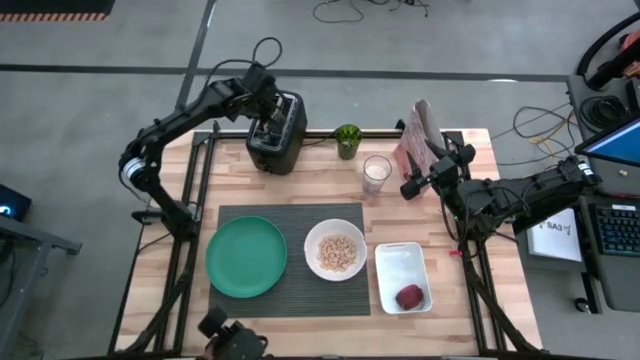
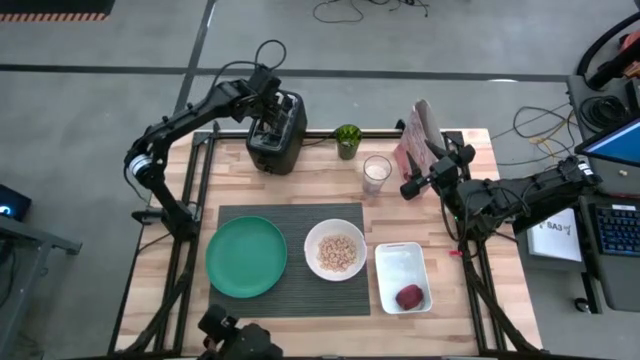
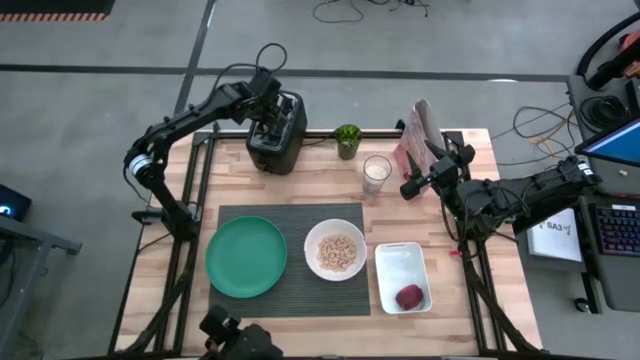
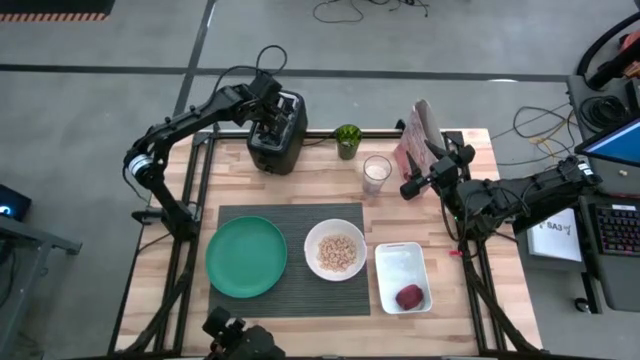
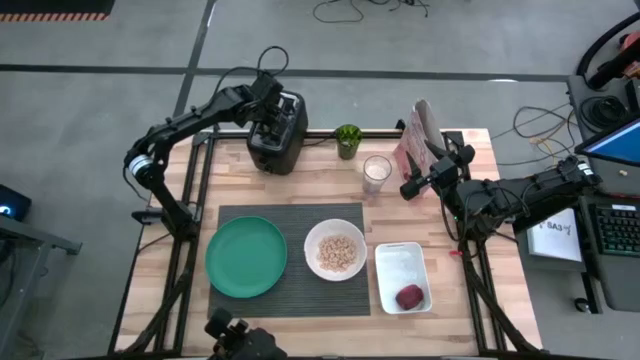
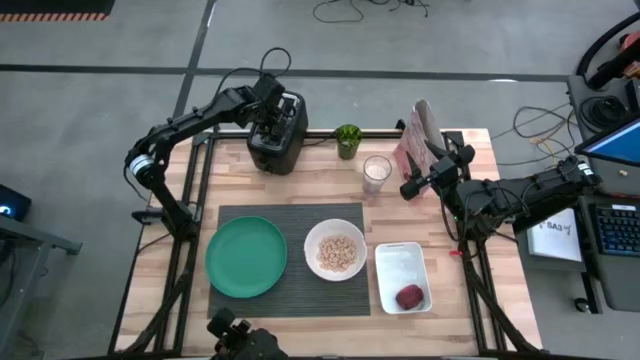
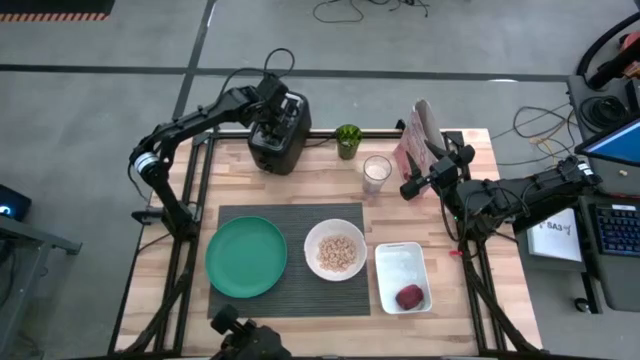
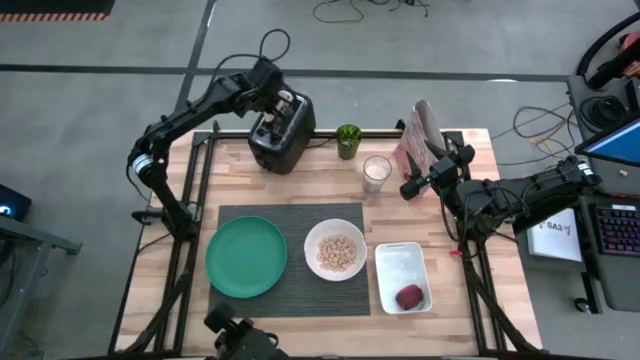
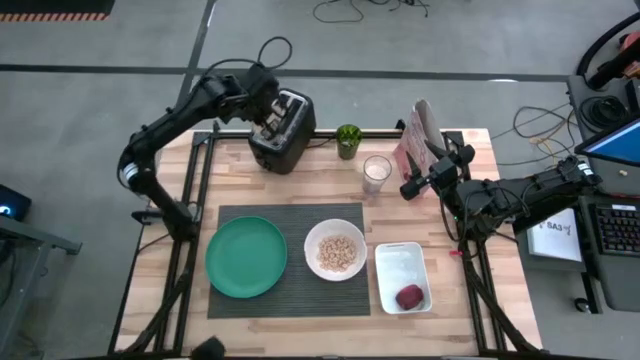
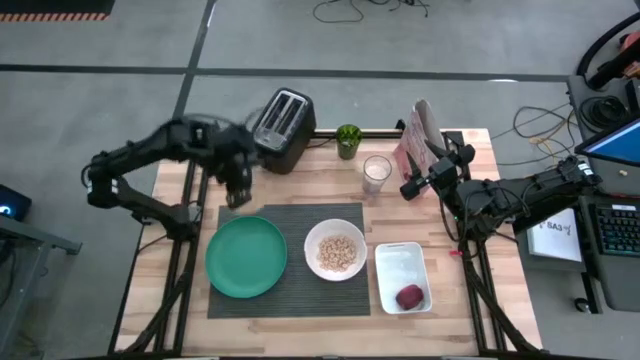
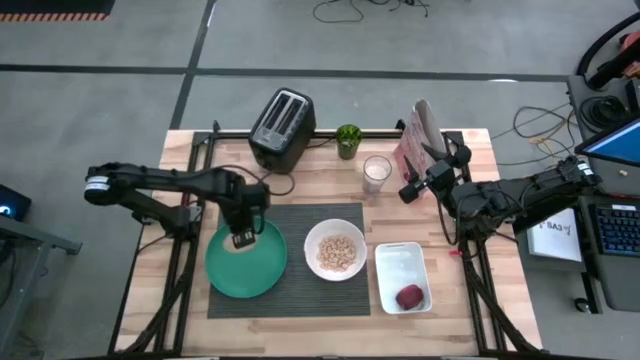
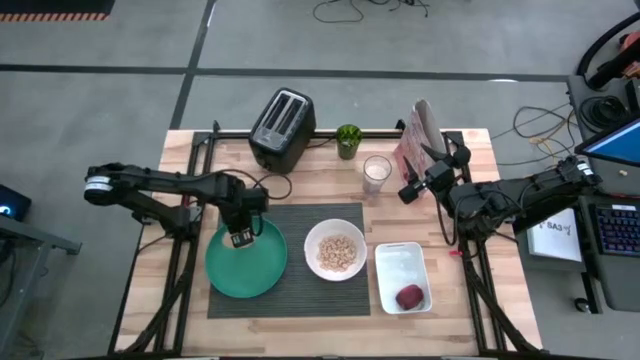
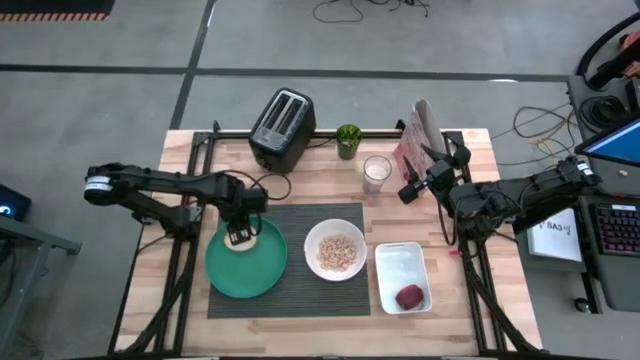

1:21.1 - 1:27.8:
Task: Arrange a breakfast setting
Put the bagel on the green plate

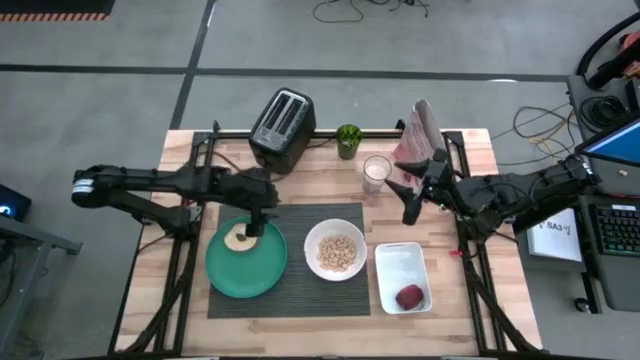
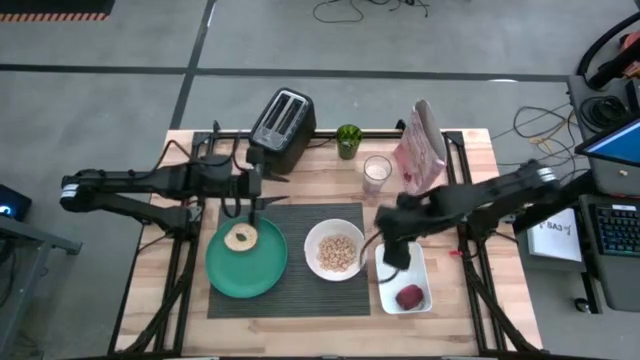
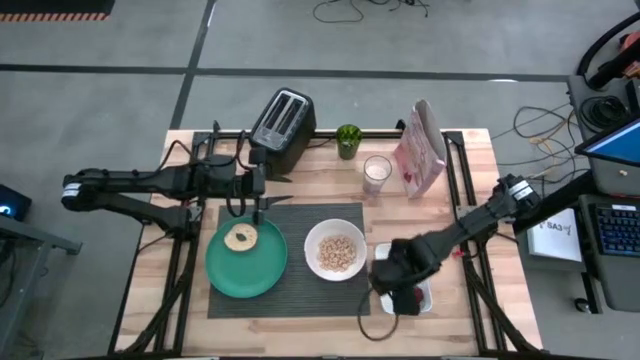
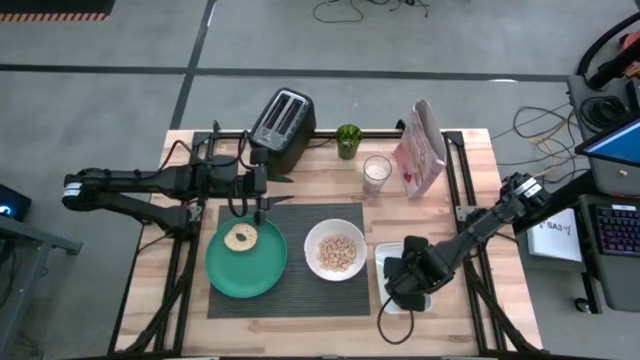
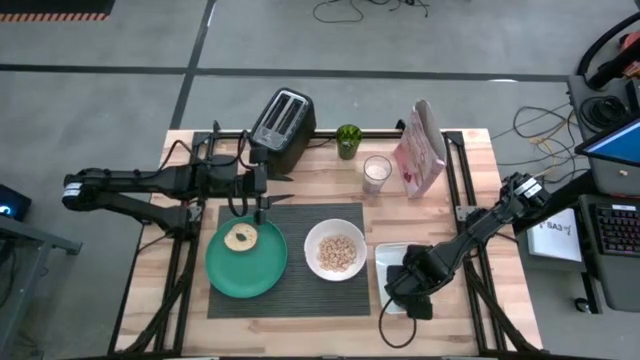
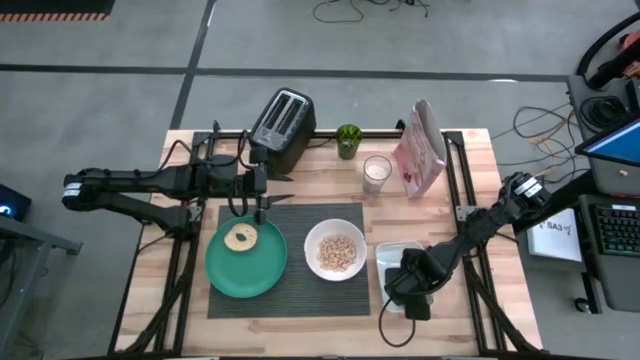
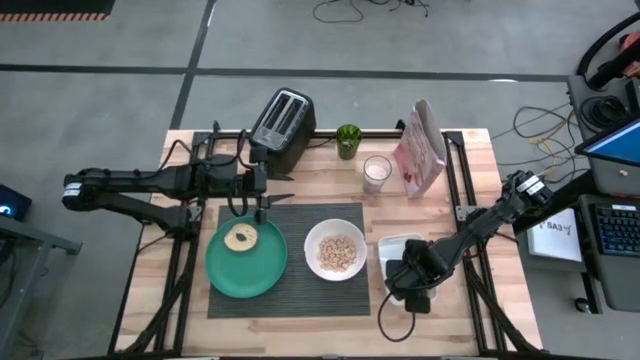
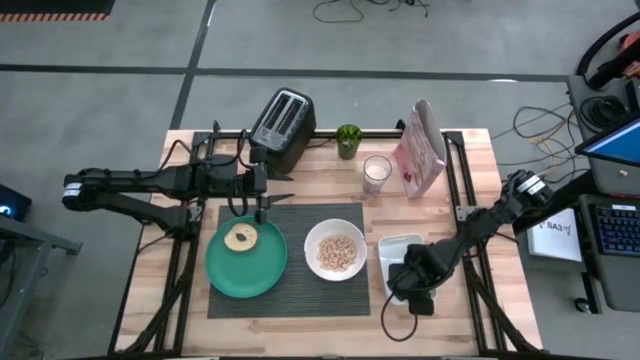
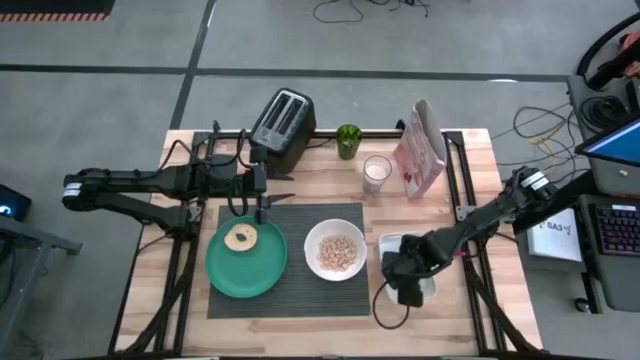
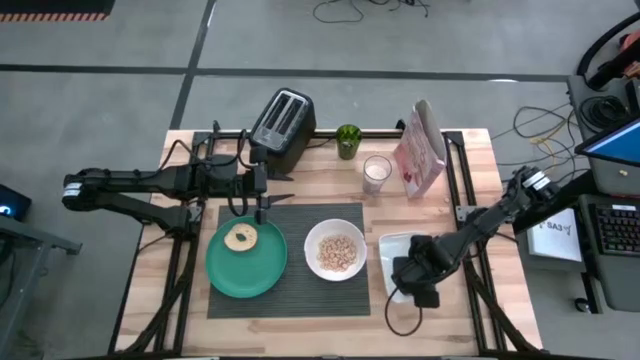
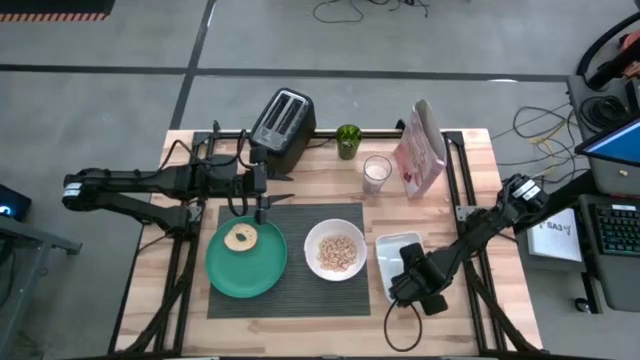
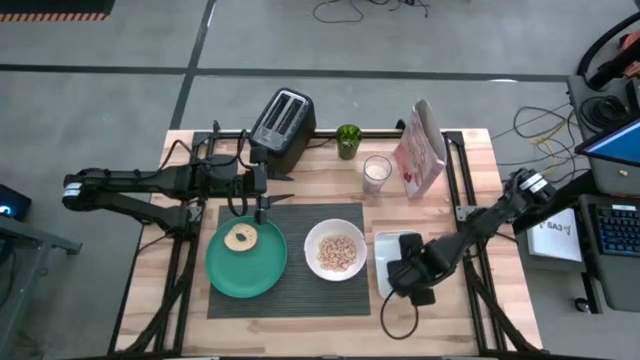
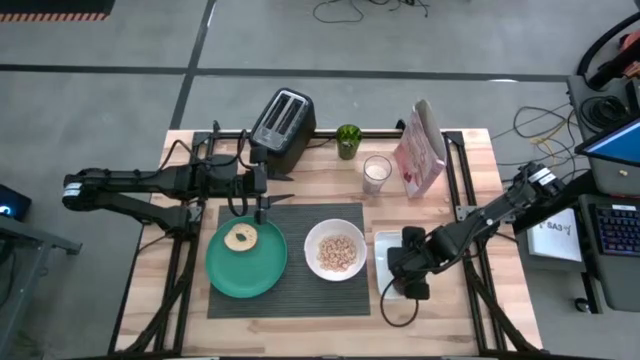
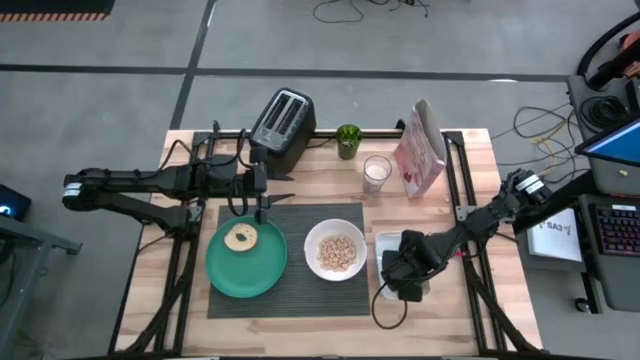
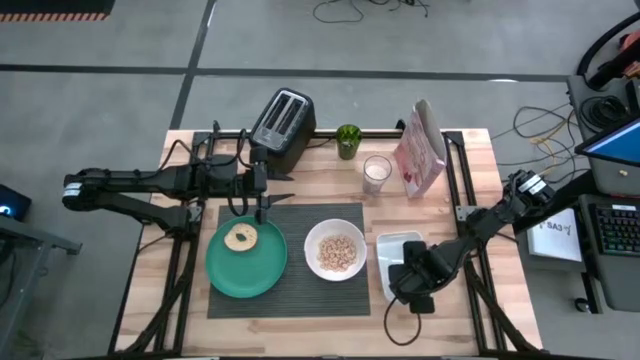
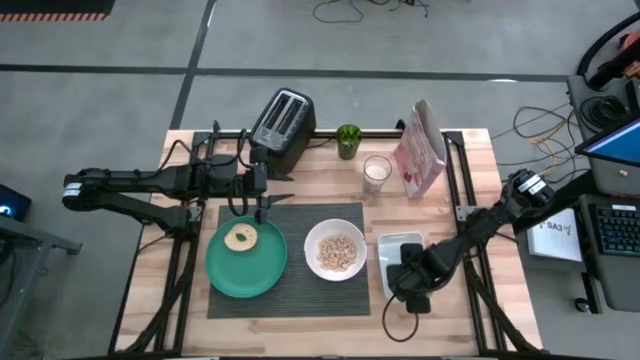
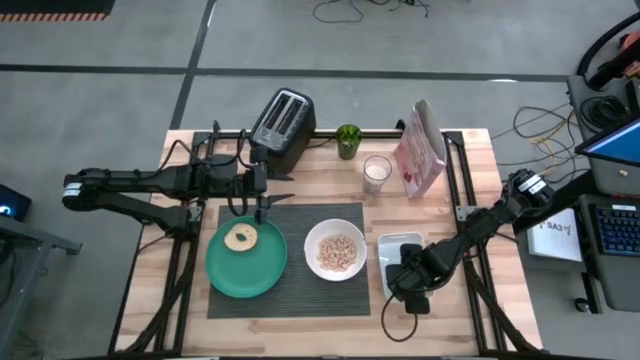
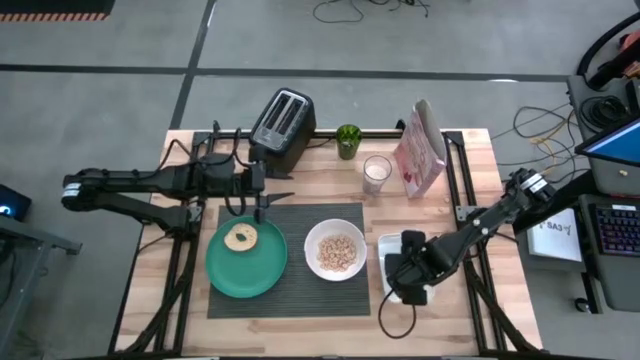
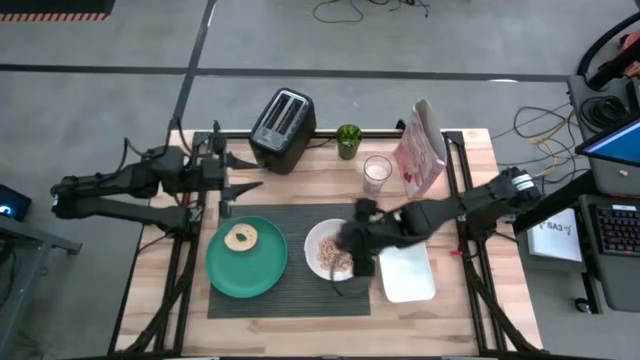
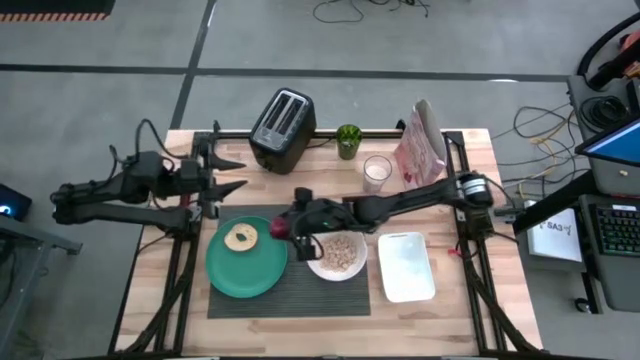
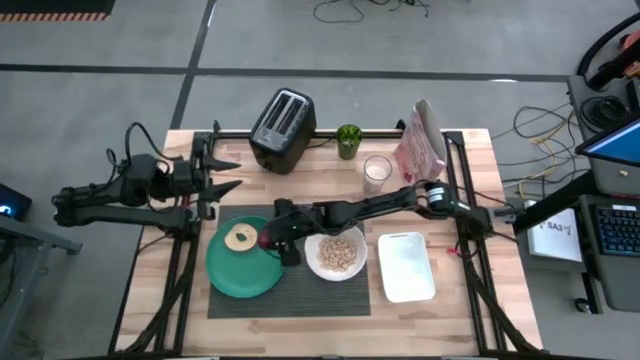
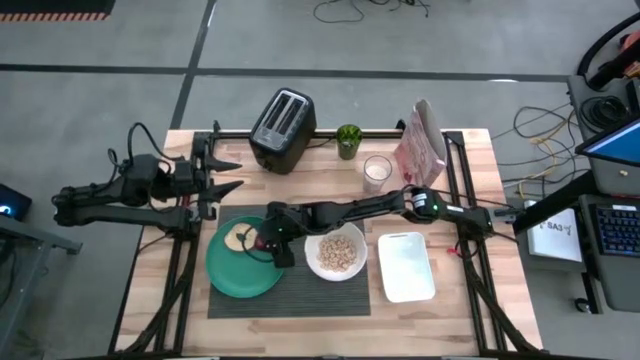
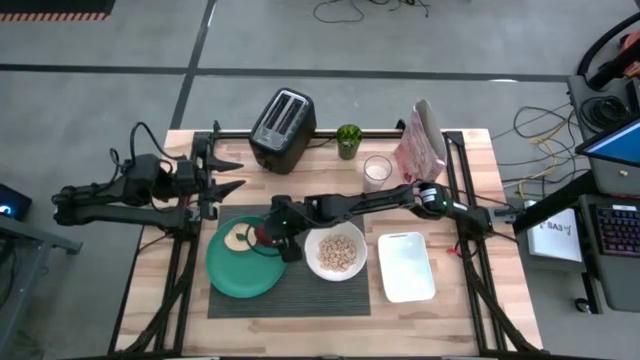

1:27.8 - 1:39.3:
Put the apple on the green plate

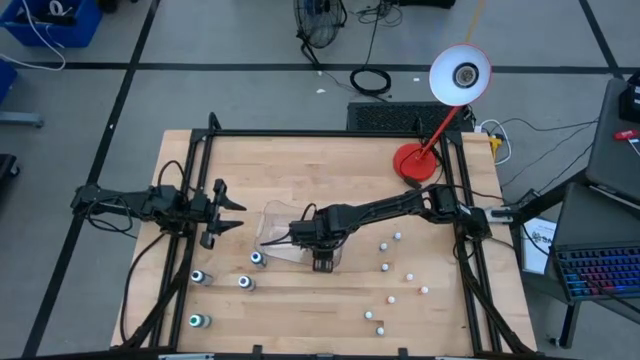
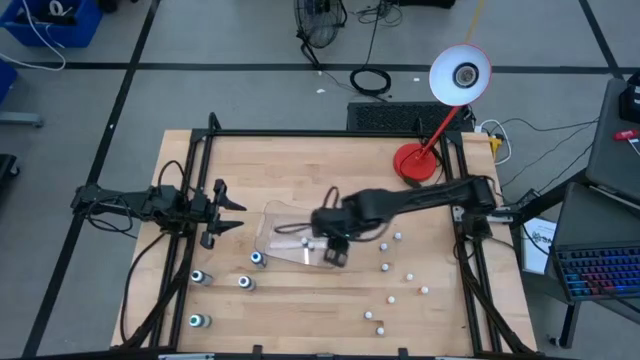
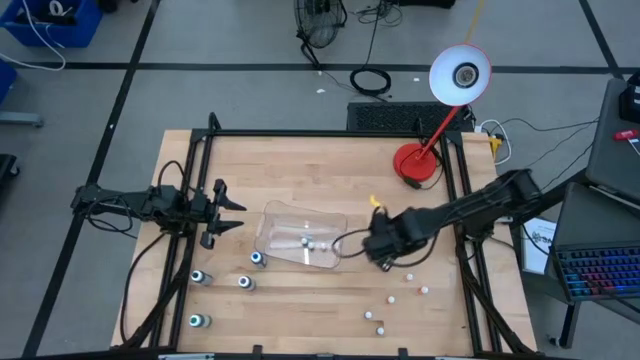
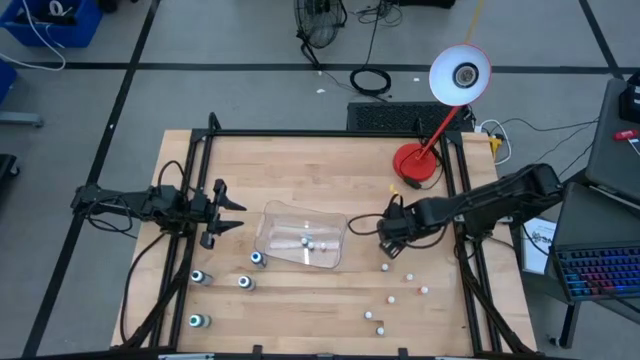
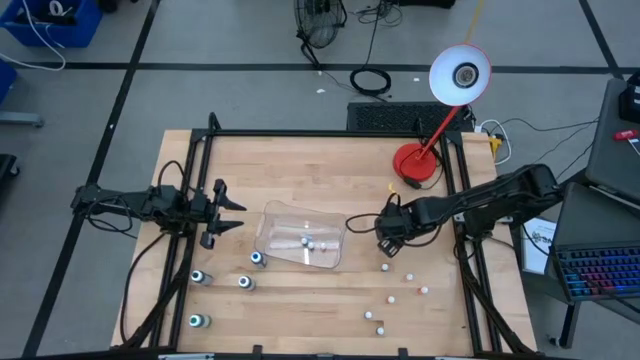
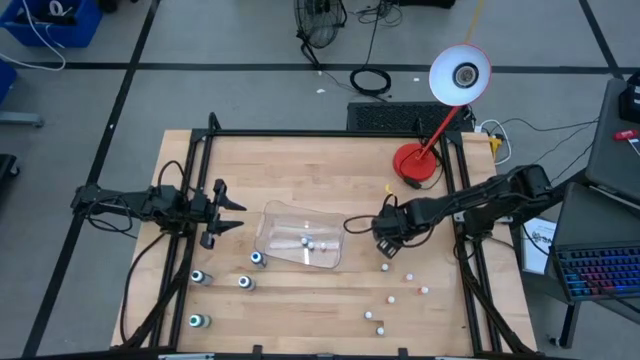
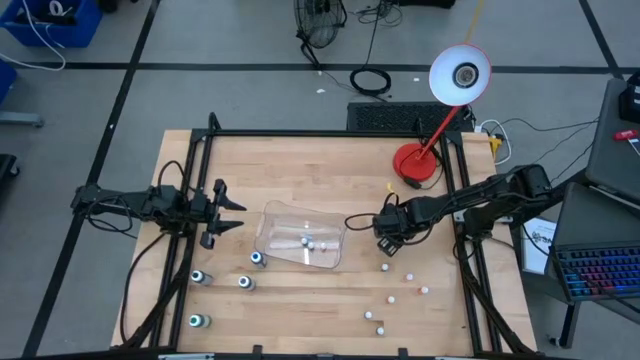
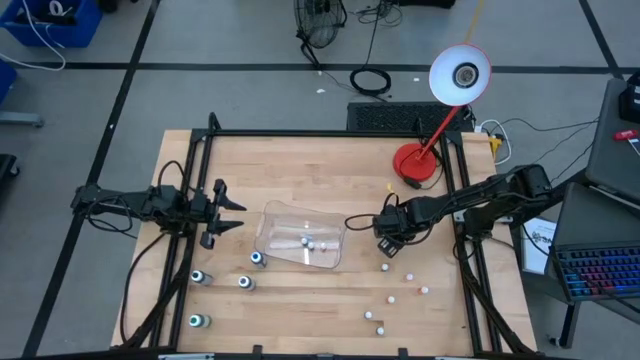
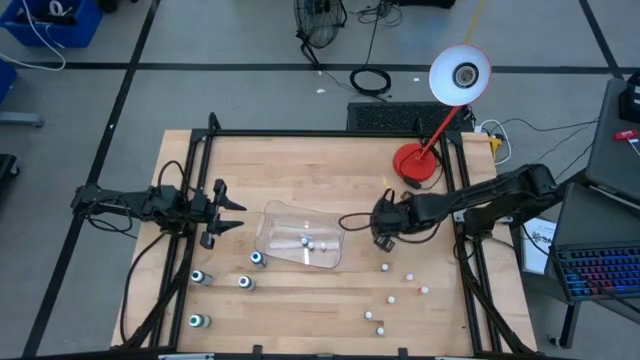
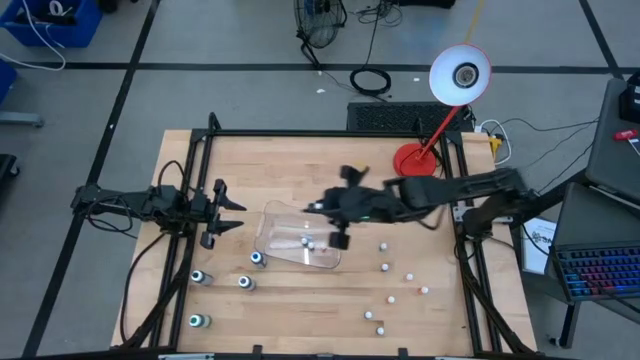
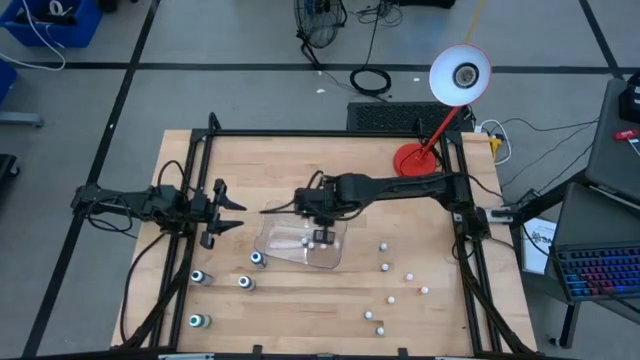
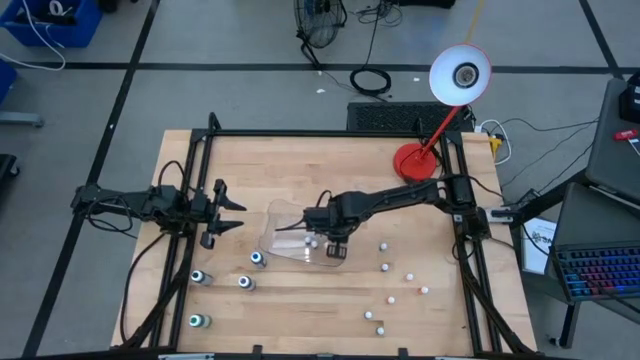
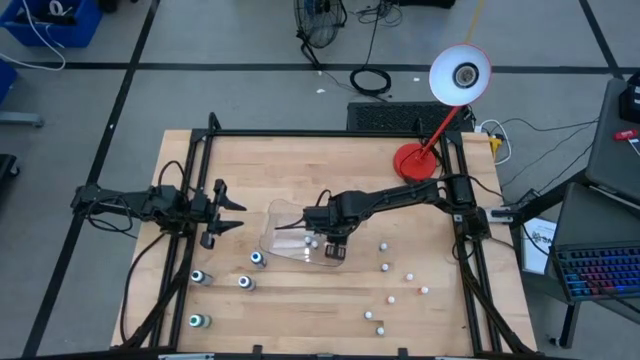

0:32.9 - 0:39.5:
Task: Pick & Place food coloring
Put the small blue food coloring bottle into the transparent bin
